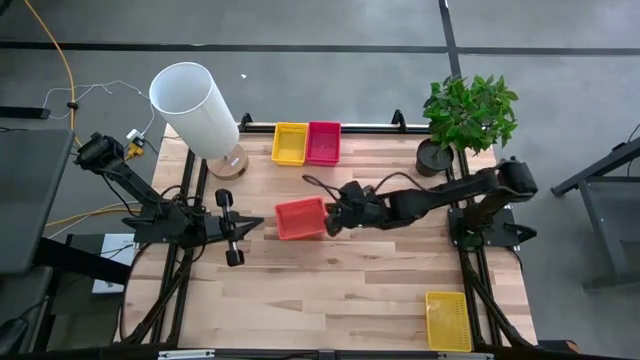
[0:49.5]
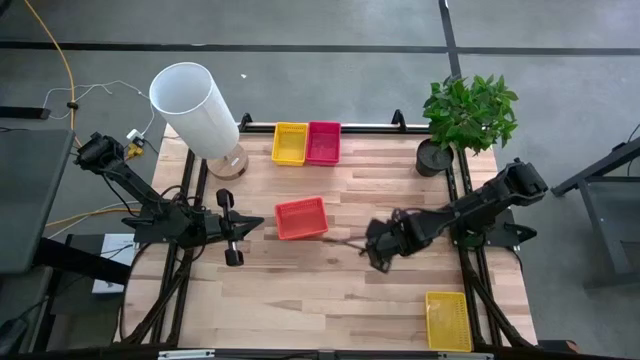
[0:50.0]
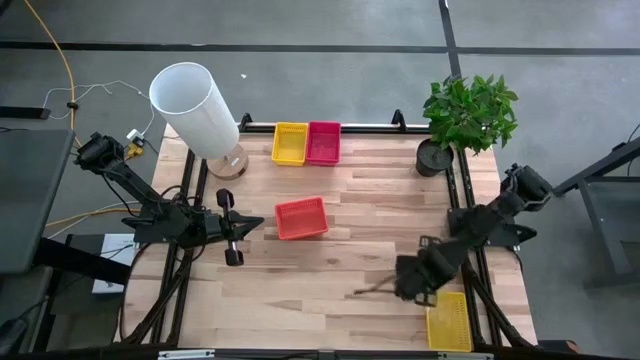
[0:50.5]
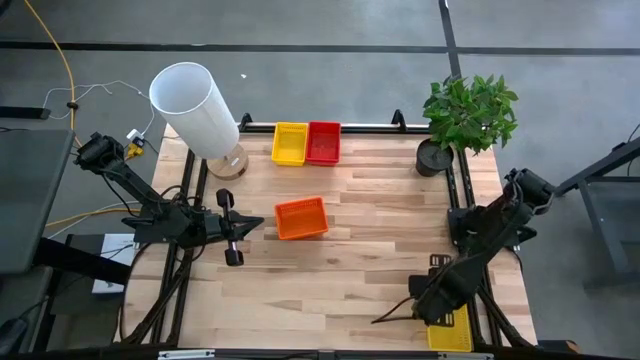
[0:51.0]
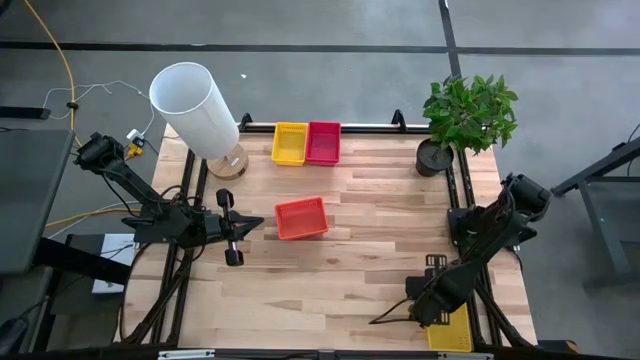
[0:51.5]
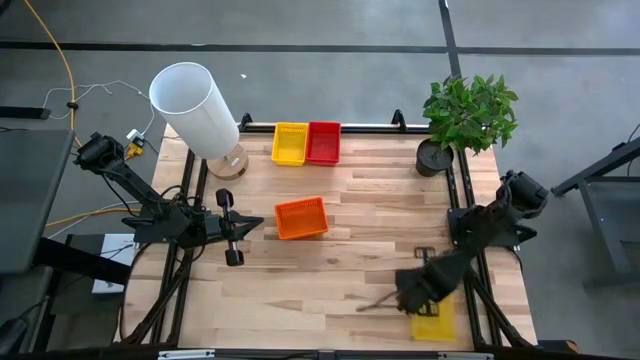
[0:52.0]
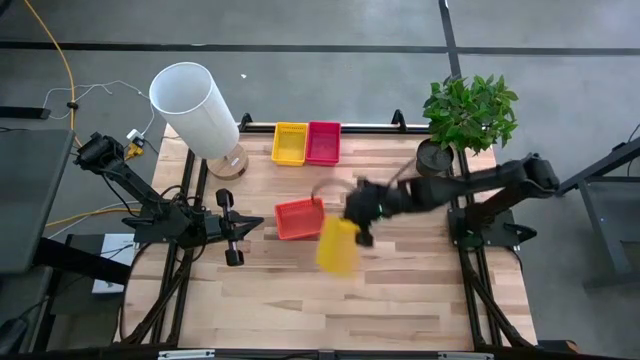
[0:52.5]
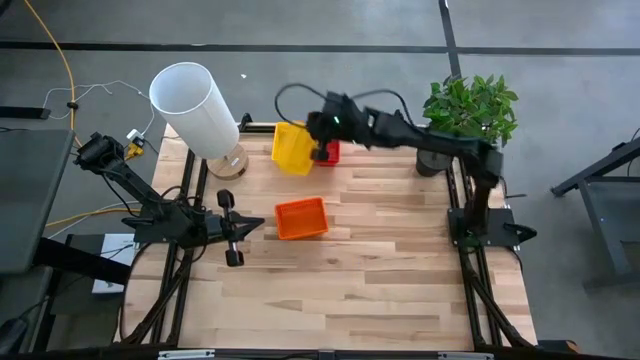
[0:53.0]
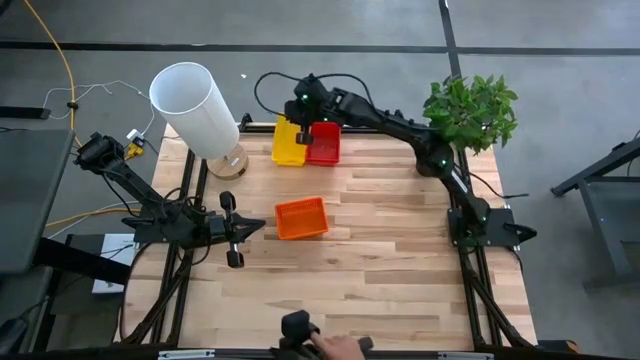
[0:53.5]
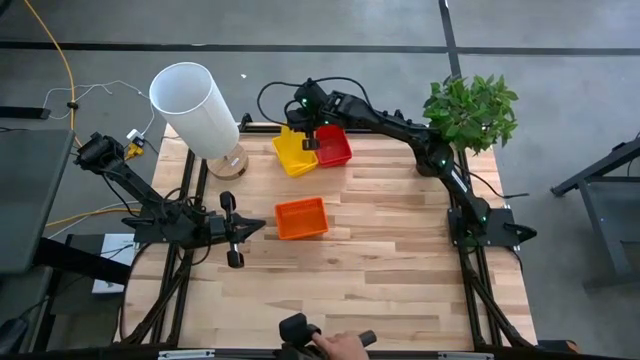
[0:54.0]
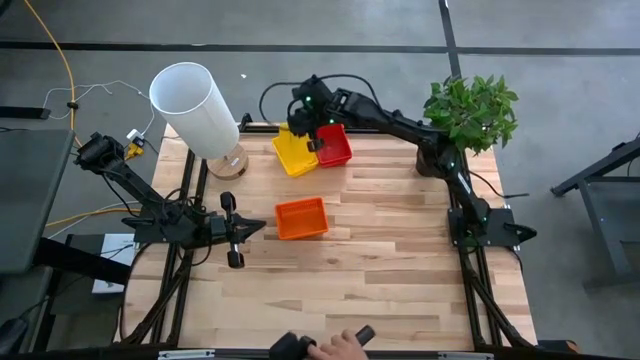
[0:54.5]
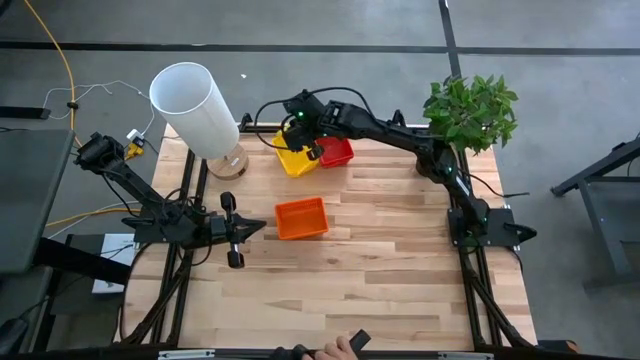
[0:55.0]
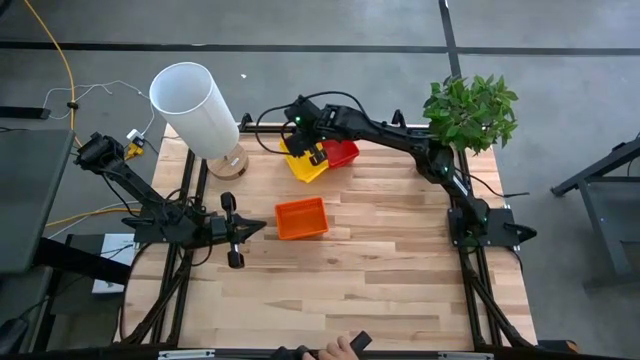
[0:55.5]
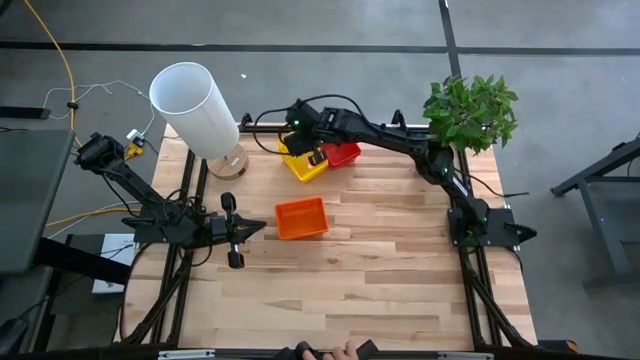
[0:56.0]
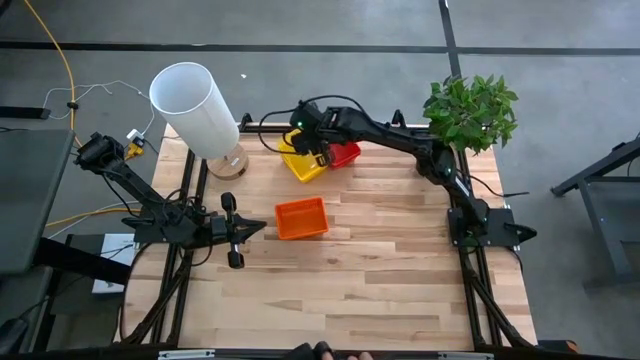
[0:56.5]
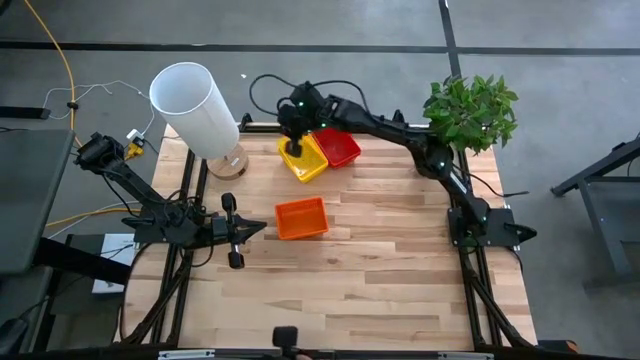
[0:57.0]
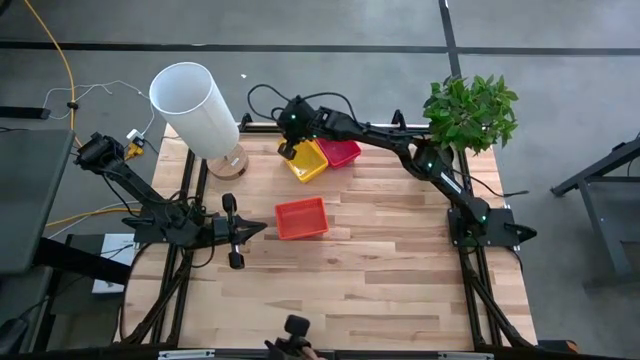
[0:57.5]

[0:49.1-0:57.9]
Stack the bottom yellow bin on top of the top yellow bin

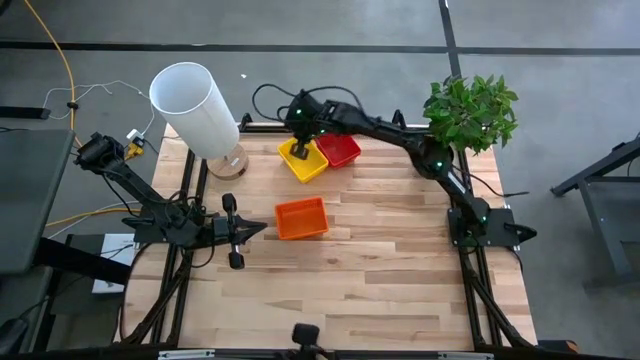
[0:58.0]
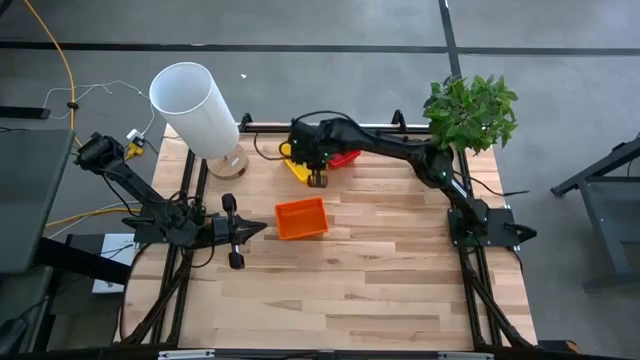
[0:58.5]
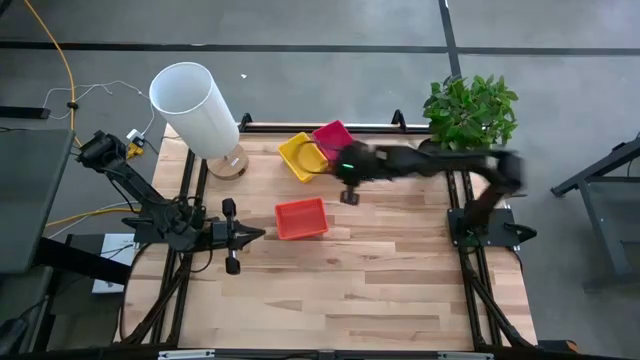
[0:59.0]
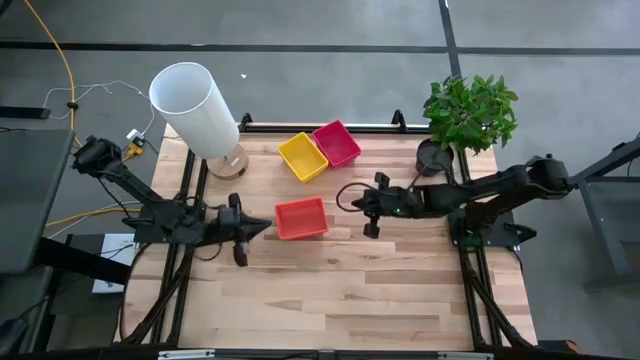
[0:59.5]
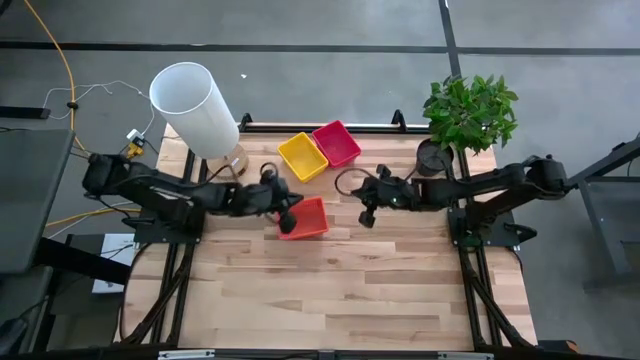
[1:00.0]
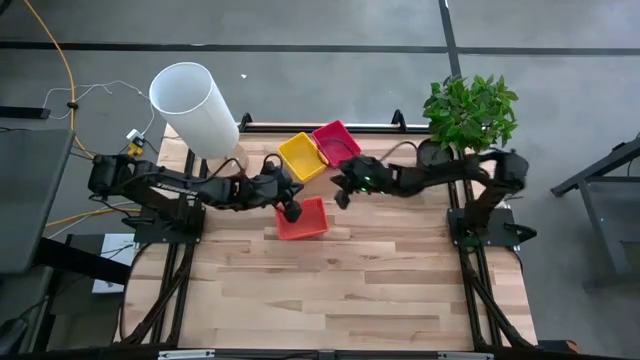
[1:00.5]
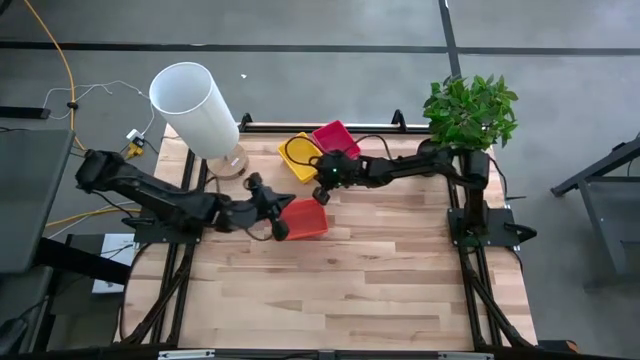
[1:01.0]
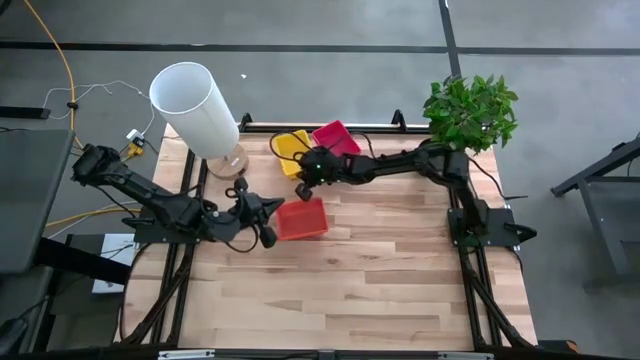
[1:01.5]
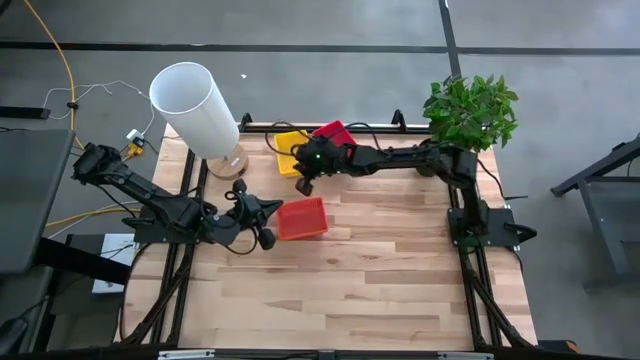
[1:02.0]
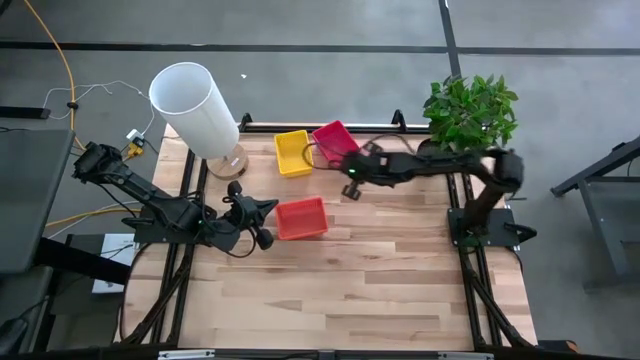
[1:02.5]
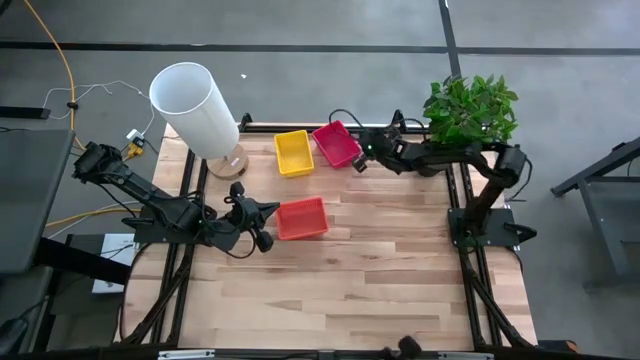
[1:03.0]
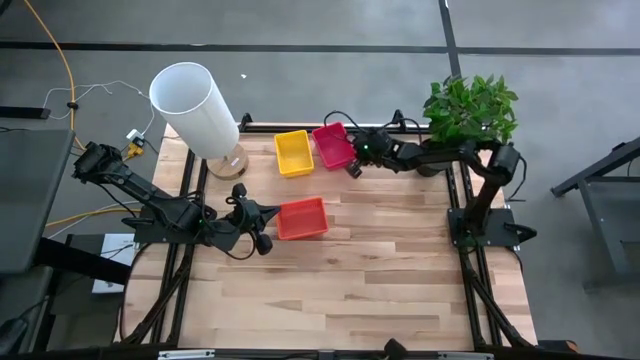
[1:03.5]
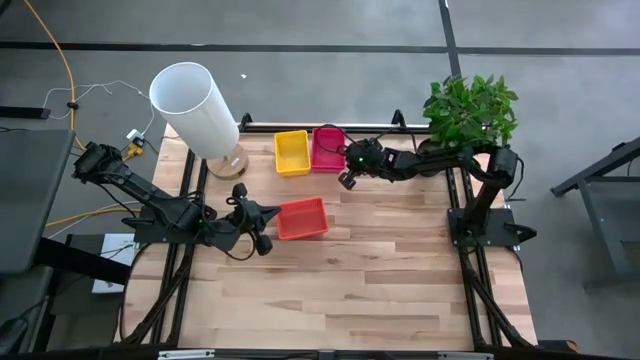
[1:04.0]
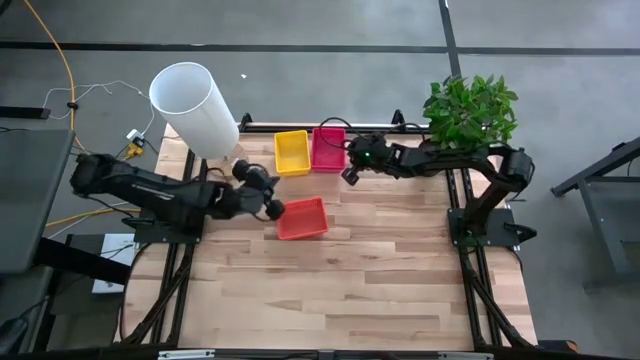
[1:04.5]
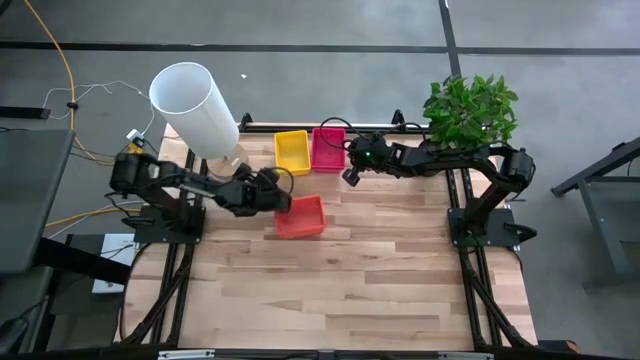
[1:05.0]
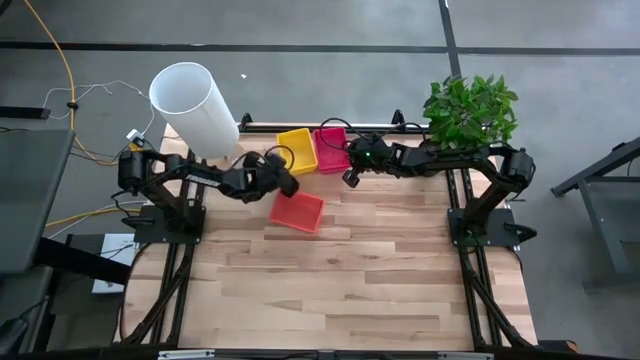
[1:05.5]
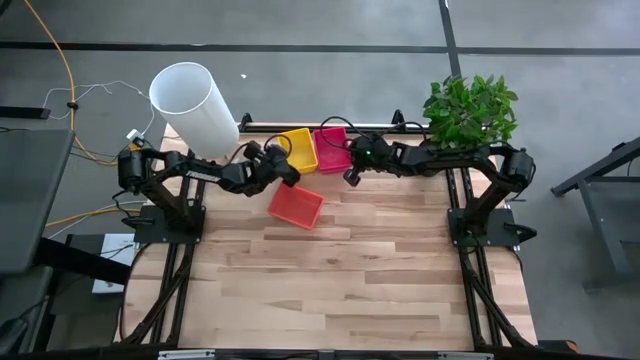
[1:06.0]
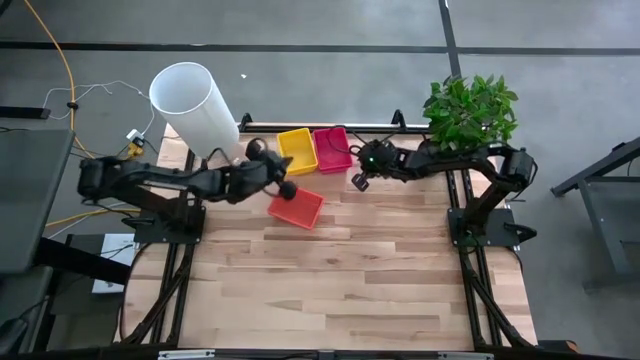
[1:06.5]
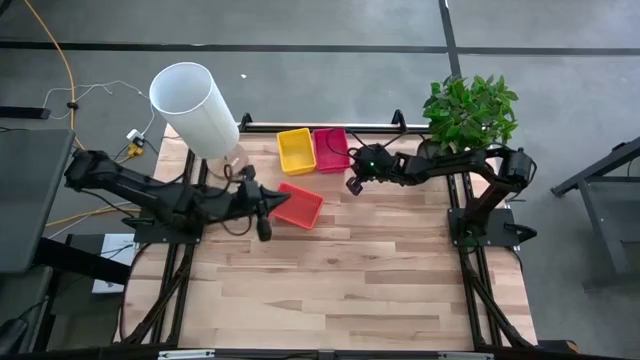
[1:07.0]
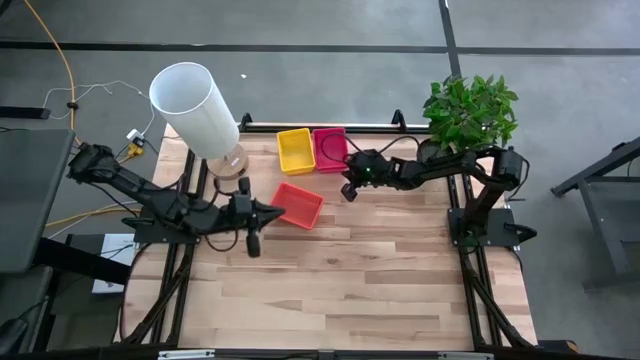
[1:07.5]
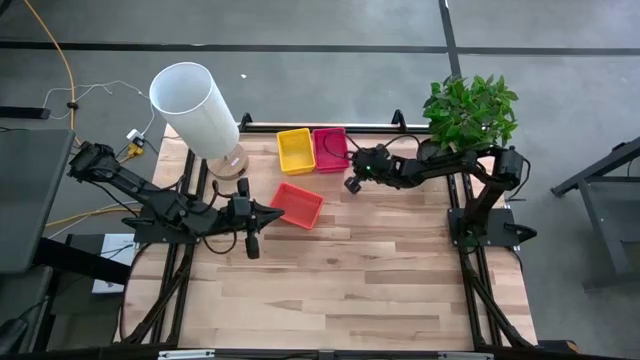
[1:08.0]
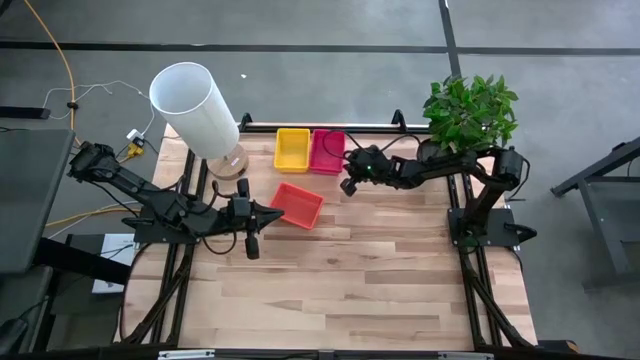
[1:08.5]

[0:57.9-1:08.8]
Adjust the stacked bins

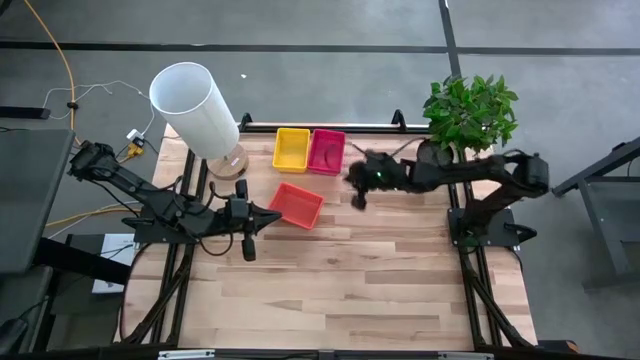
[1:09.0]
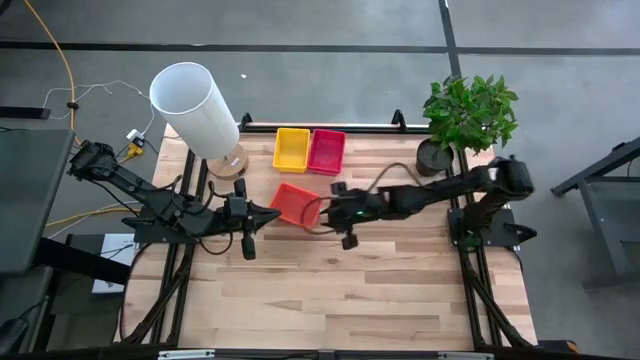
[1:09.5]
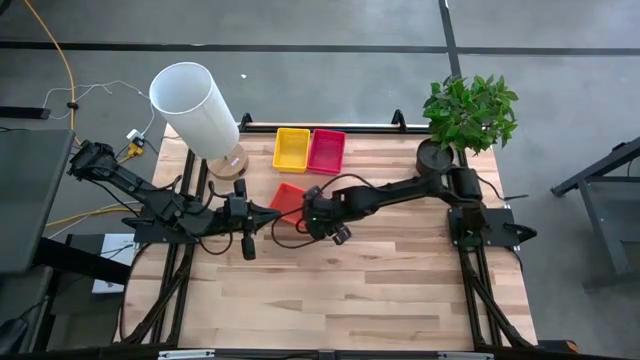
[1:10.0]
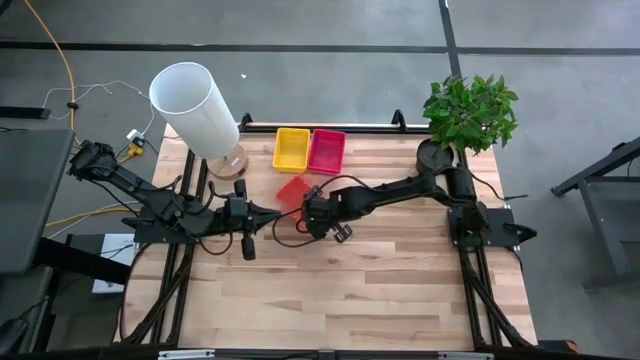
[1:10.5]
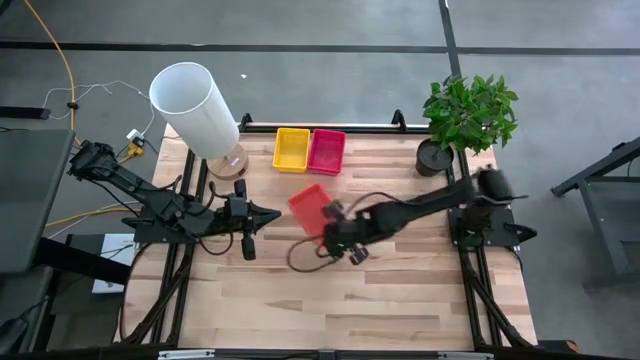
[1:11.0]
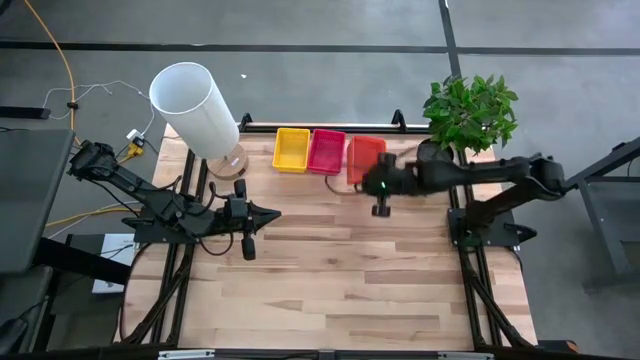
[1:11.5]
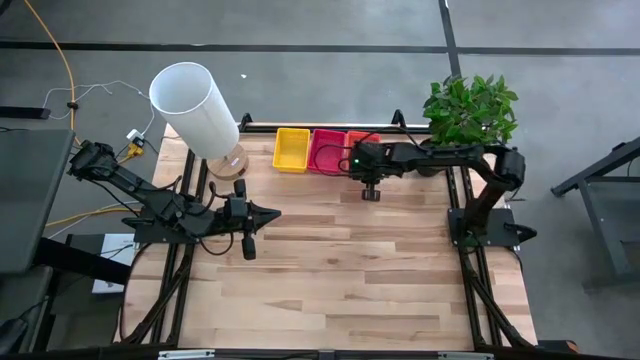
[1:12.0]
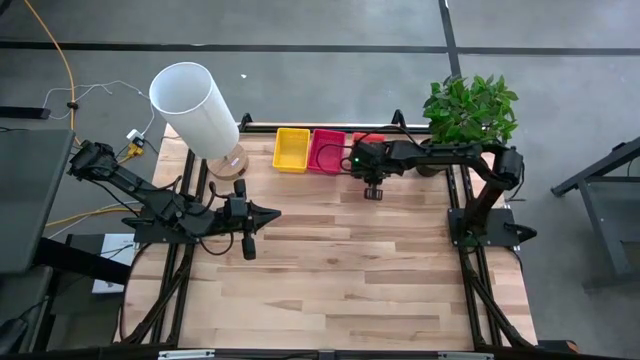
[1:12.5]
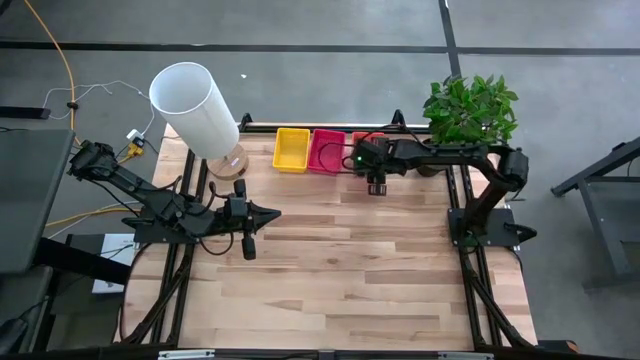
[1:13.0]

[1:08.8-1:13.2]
Move the stacked orange bins to the right of the stacked red bins
